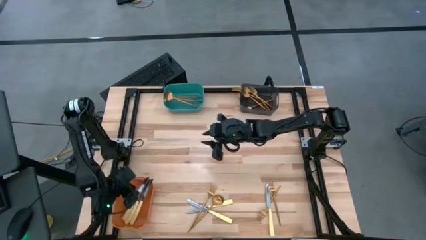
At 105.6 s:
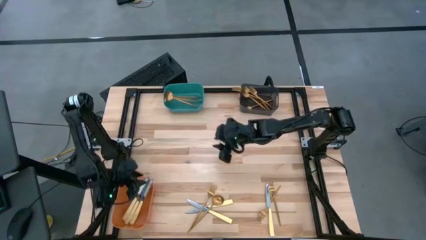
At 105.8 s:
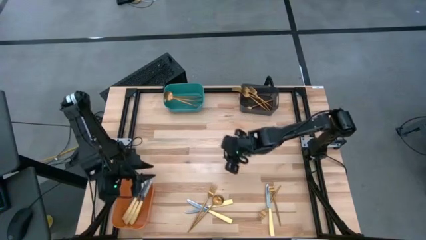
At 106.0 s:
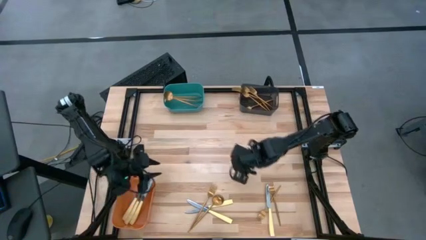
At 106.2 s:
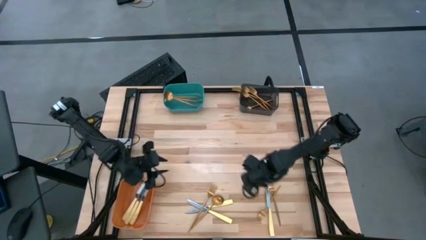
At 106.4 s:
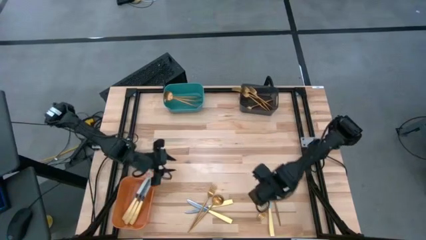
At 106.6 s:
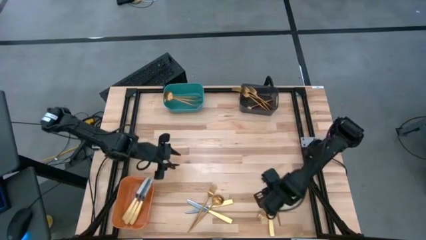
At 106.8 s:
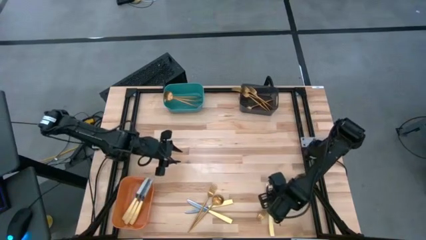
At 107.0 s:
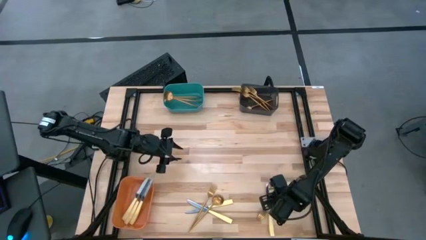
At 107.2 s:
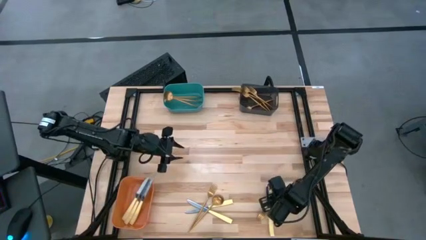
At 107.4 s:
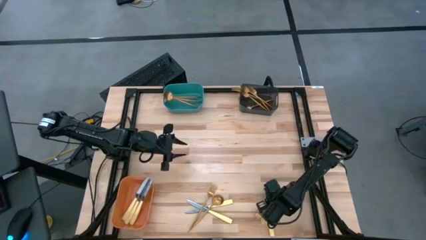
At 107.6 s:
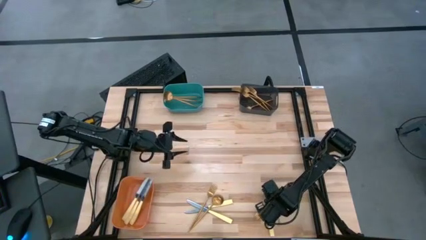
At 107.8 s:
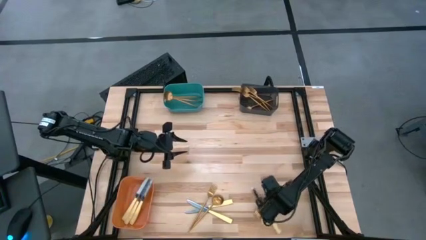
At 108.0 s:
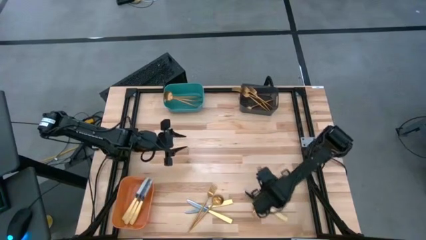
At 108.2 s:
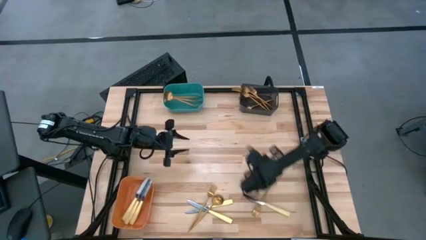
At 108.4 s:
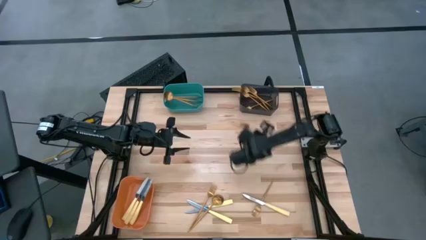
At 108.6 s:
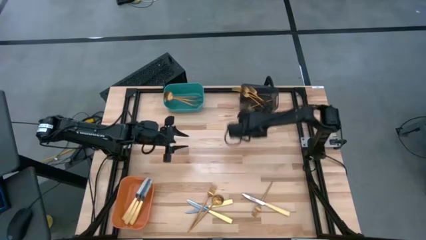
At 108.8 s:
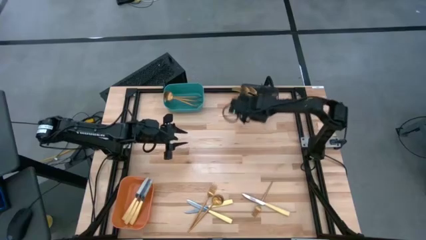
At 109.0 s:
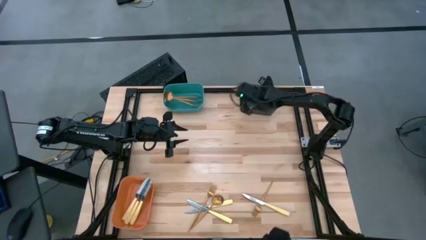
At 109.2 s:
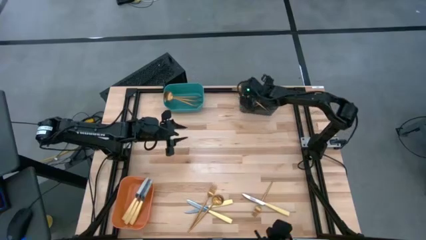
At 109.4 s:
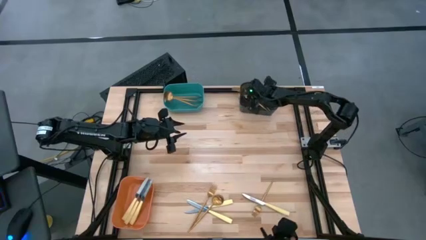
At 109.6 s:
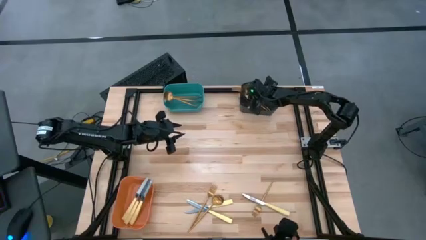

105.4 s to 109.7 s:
Task: Sort silverware by color (type)
Put the gold fork into the black bin

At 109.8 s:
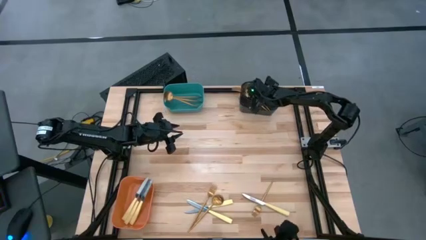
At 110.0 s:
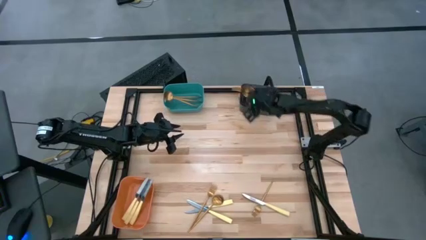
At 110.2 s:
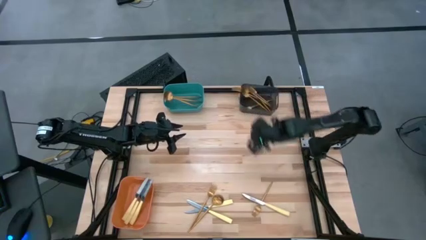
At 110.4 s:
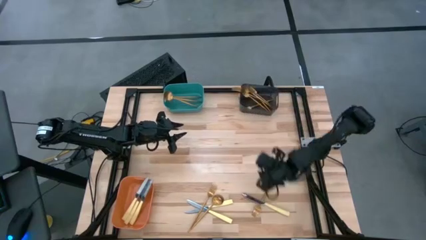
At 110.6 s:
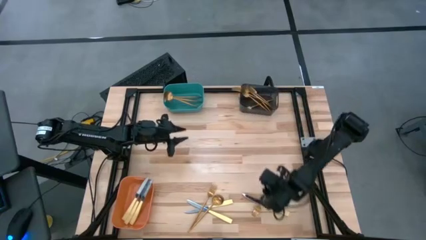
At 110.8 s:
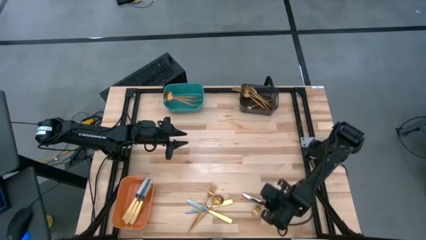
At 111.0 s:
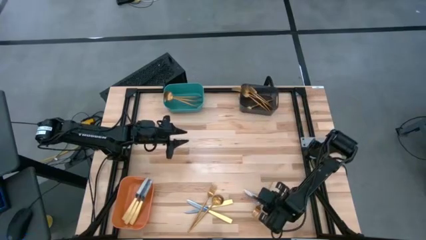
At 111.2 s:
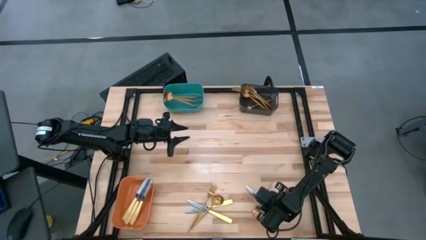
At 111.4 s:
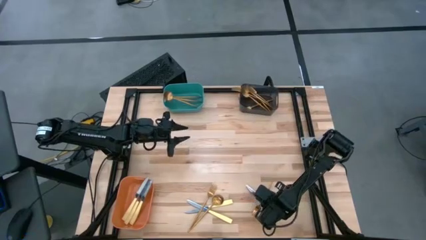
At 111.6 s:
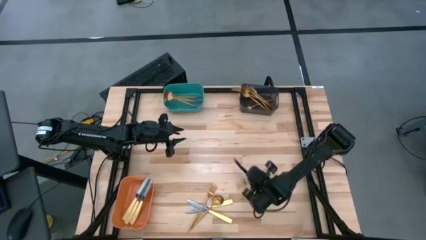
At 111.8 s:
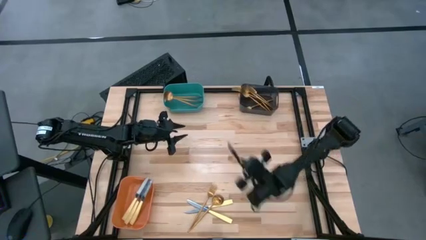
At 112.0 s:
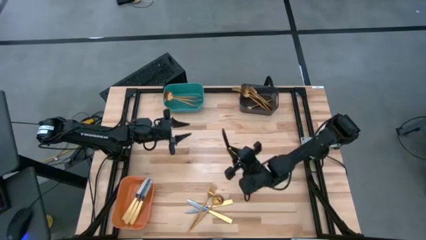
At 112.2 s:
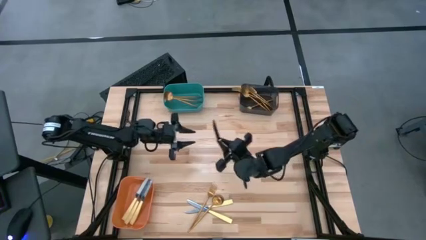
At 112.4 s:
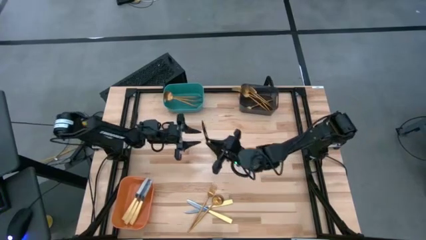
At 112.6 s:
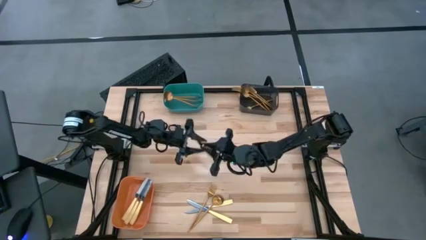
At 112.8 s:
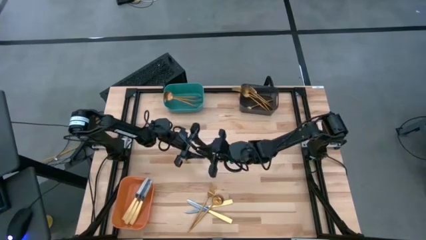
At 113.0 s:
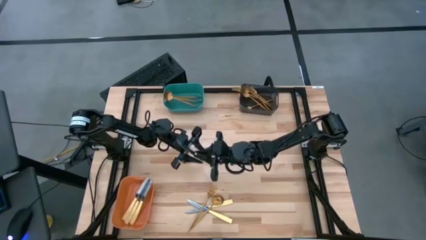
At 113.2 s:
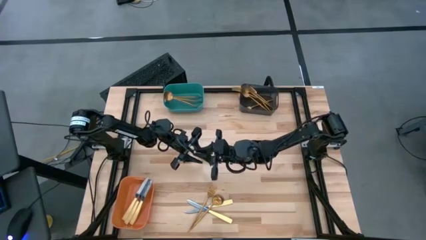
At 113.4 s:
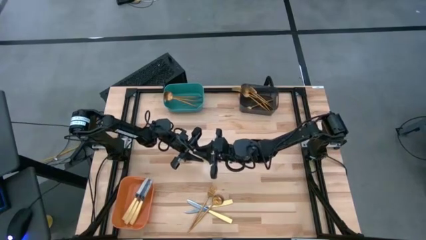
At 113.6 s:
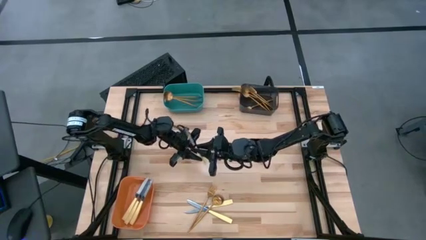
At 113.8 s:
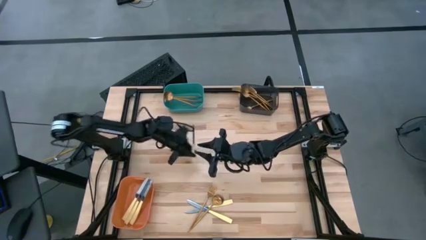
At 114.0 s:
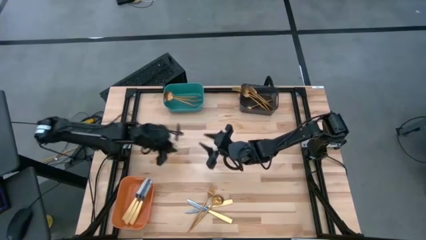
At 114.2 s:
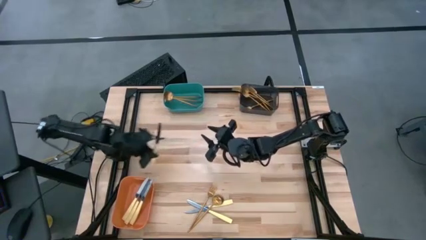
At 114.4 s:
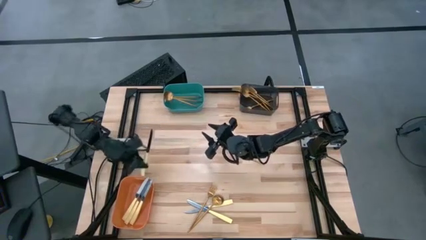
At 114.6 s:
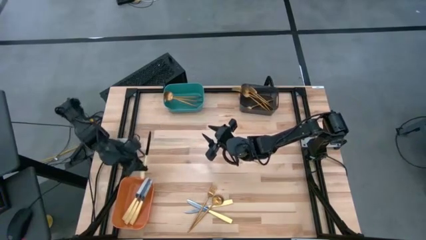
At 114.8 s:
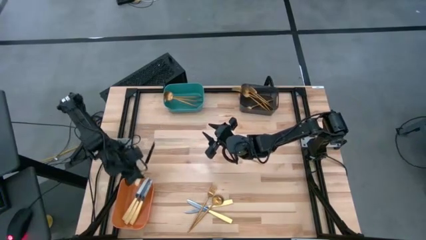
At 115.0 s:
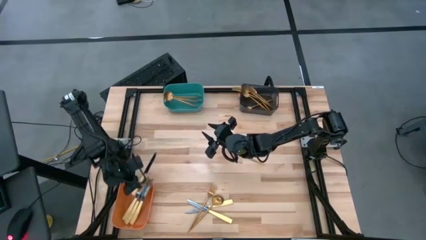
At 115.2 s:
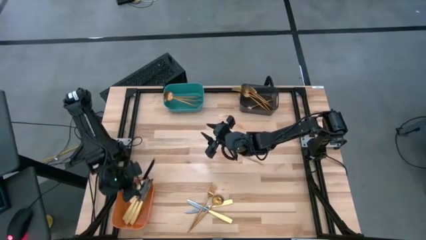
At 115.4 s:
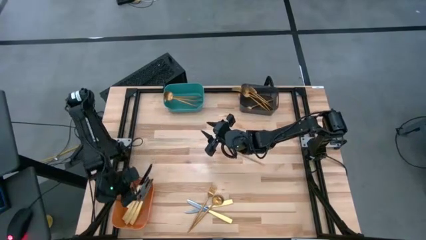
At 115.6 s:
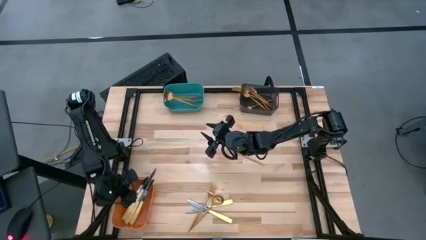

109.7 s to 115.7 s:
Put the yellow table knife into the orange bin

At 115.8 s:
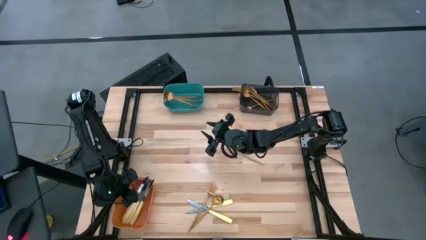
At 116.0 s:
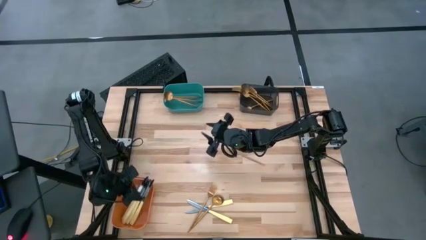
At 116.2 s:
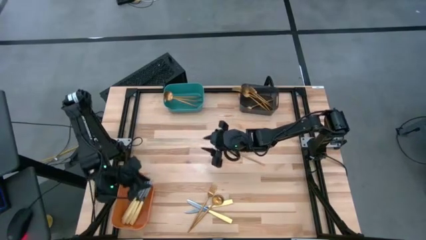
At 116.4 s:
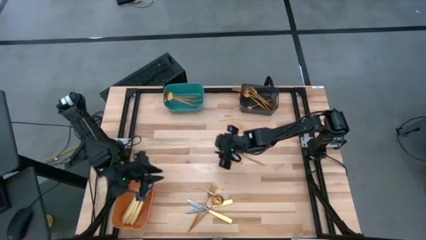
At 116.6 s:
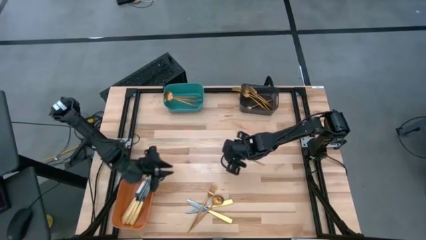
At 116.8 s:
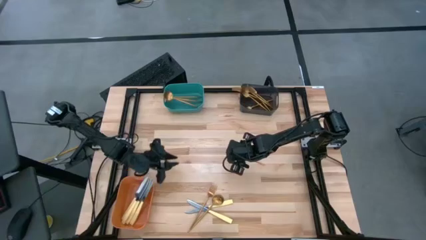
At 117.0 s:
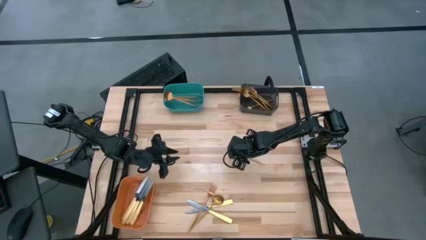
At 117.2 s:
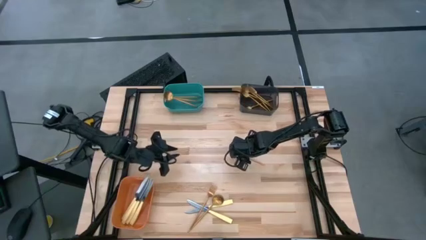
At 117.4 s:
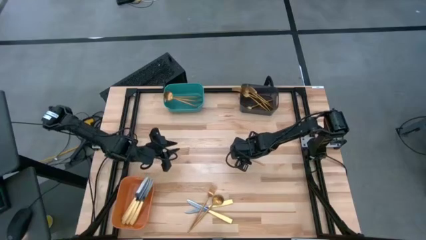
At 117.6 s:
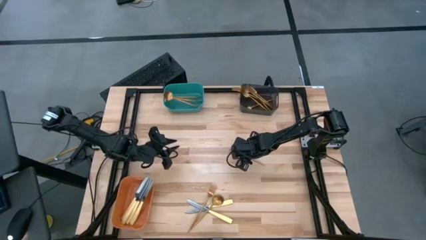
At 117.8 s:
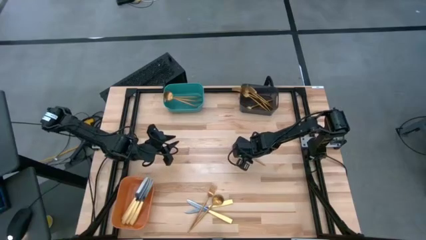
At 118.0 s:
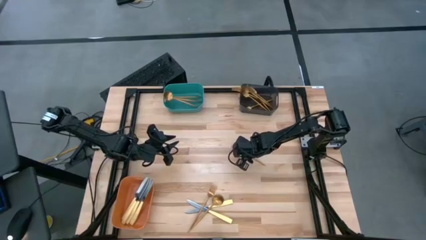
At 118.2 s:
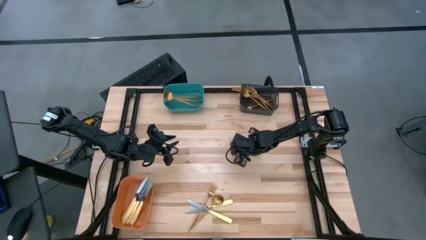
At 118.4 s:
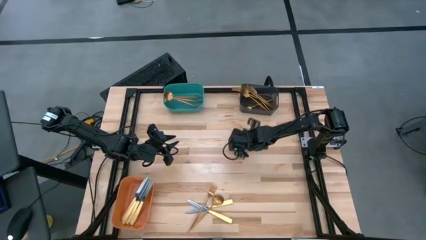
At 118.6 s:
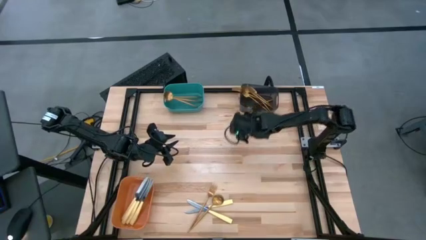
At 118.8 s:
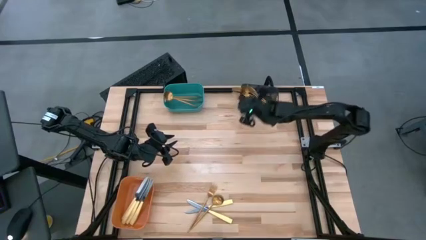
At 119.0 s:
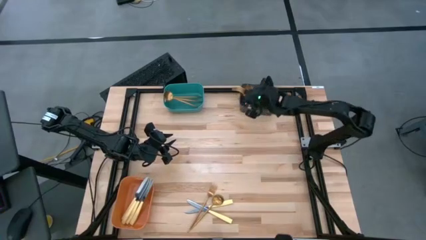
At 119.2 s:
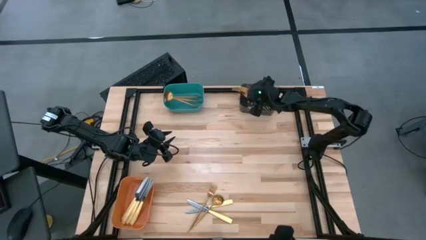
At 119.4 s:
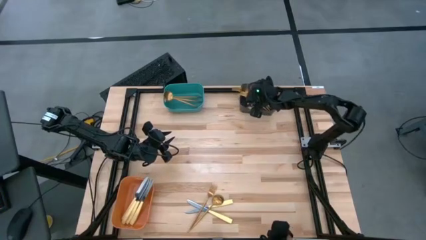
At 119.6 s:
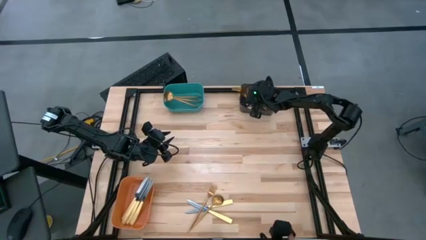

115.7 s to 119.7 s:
Put the gold fork into the black bin
